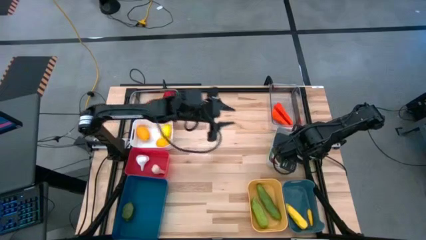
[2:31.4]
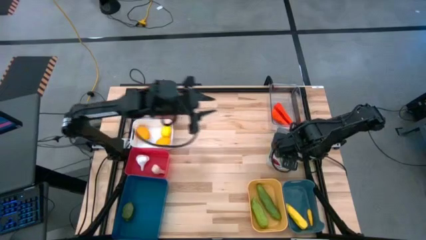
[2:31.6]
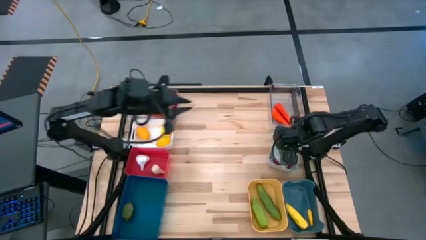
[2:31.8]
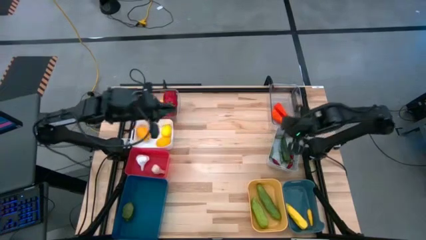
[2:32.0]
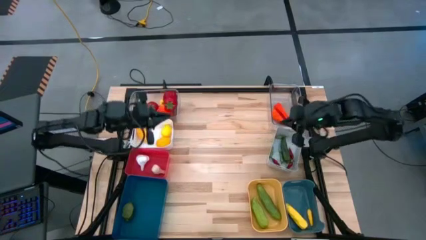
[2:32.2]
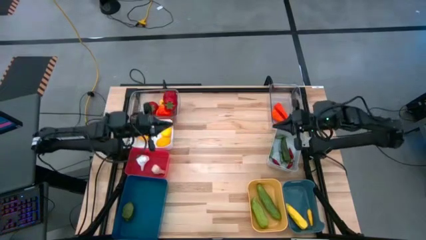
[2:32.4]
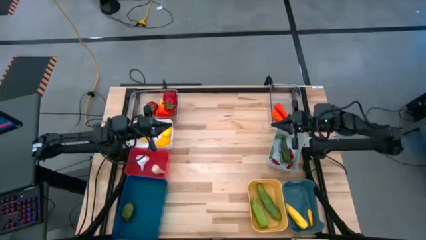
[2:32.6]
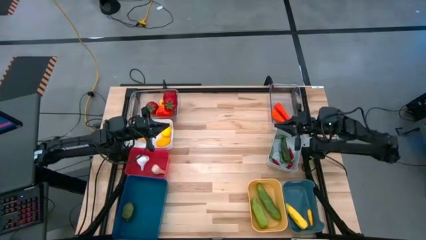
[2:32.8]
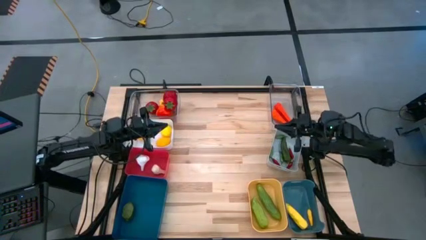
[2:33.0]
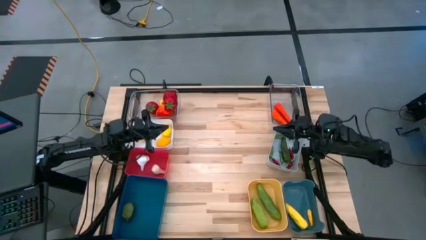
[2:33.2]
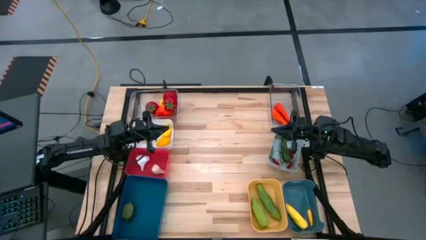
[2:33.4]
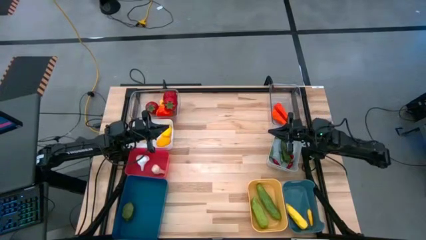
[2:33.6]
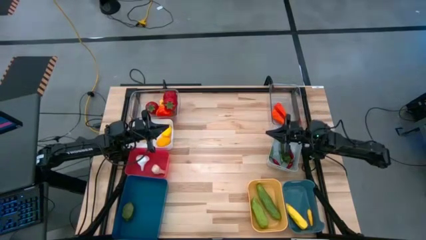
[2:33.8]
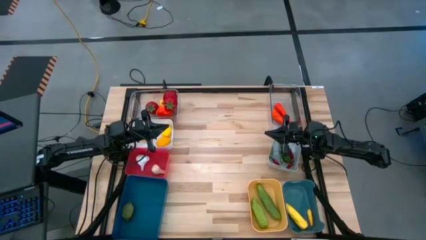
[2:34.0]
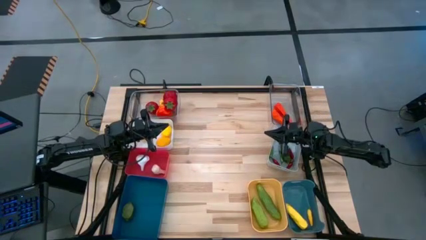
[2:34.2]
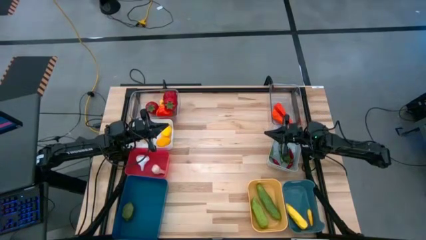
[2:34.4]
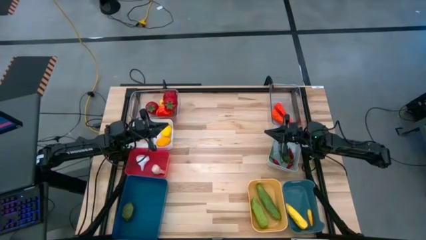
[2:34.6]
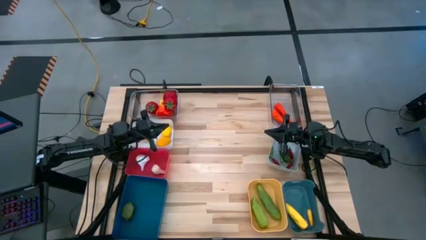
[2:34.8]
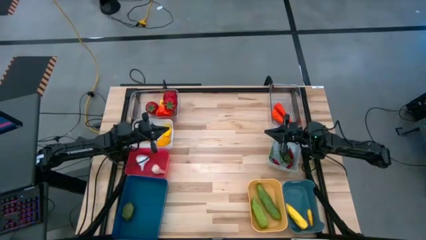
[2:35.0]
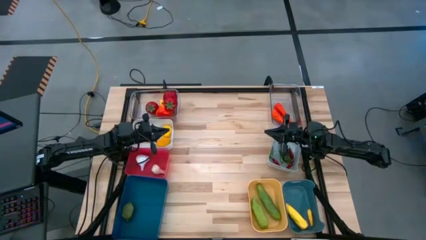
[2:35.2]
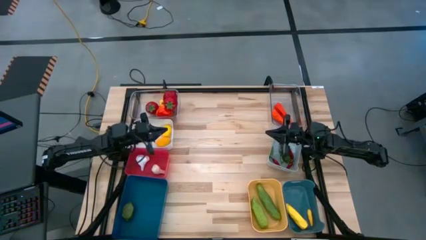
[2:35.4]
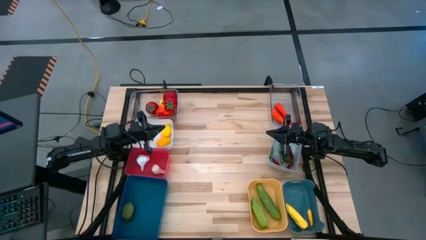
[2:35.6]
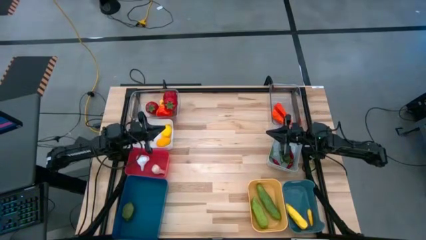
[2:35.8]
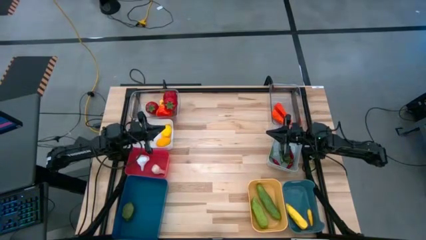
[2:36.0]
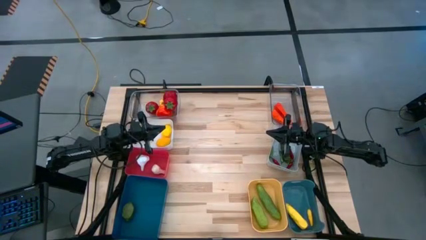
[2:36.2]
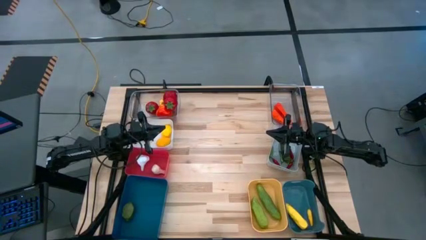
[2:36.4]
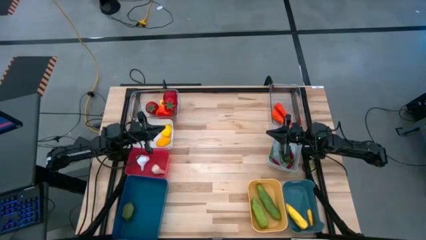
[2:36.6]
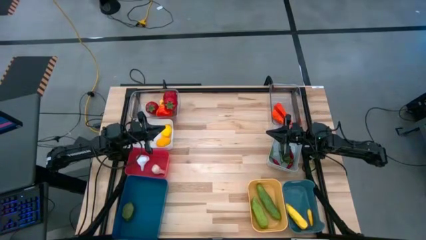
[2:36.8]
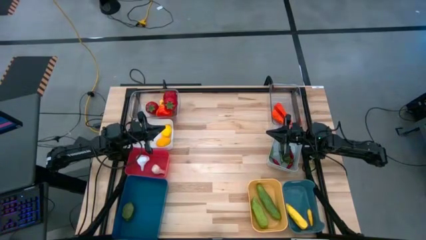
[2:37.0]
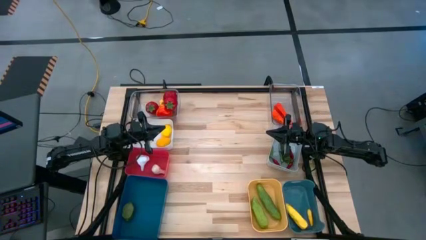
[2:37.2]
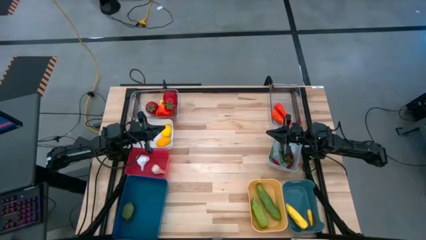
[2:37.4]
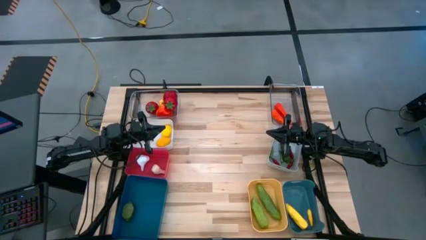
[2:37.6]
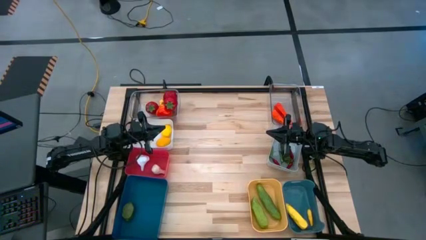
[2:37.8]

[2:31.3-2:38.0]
Task: Sort produce into baskets
Return to Home Position

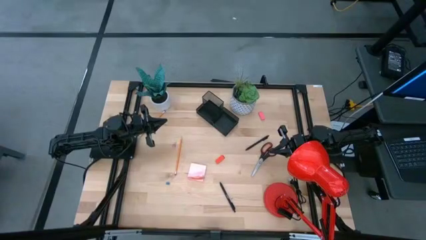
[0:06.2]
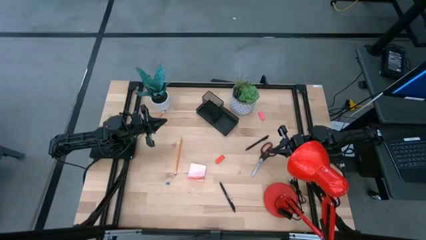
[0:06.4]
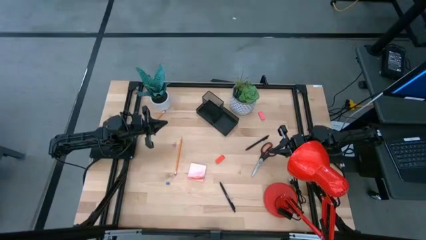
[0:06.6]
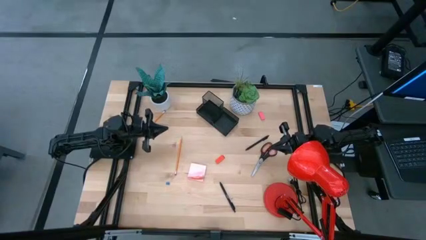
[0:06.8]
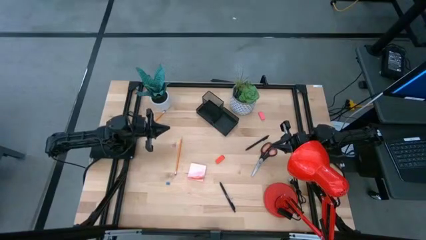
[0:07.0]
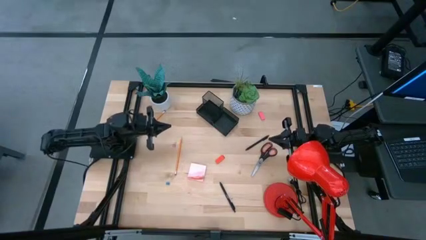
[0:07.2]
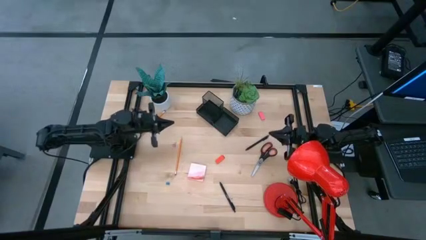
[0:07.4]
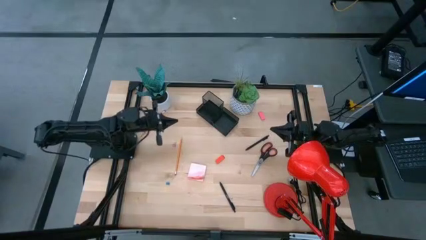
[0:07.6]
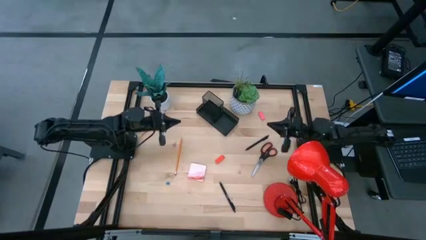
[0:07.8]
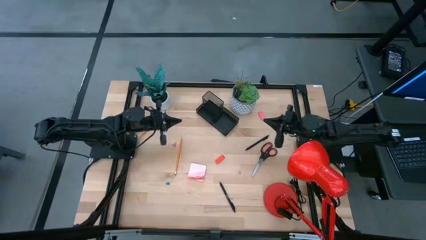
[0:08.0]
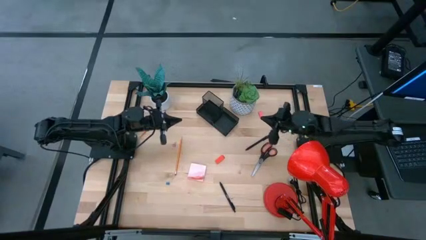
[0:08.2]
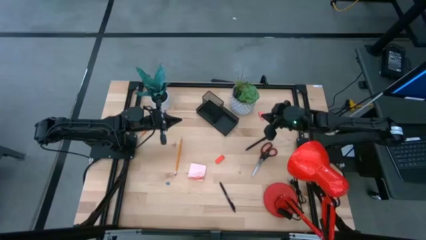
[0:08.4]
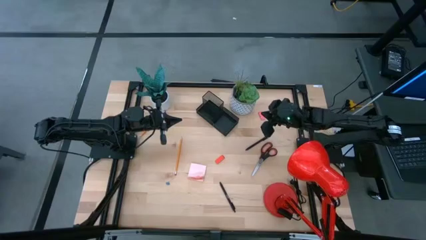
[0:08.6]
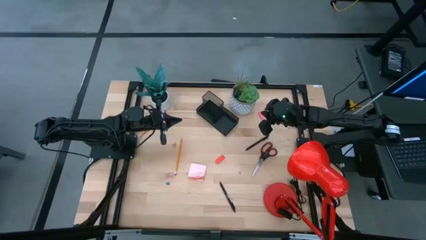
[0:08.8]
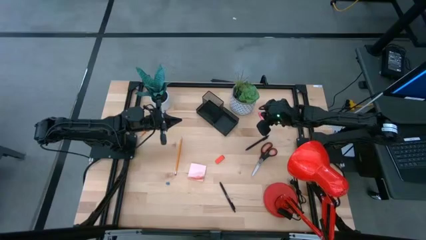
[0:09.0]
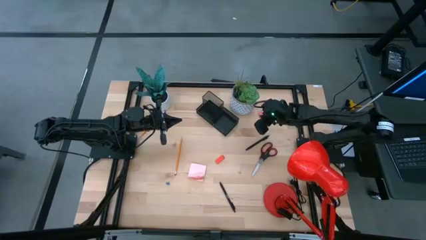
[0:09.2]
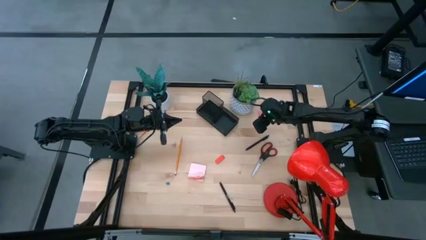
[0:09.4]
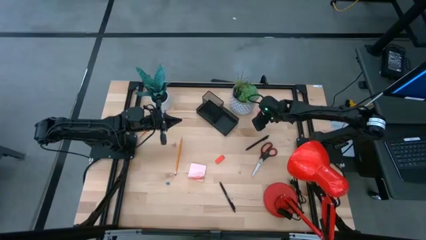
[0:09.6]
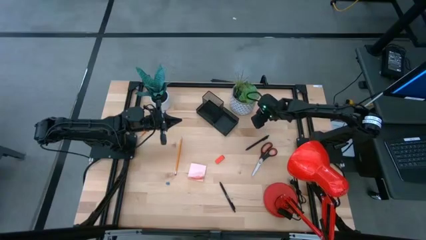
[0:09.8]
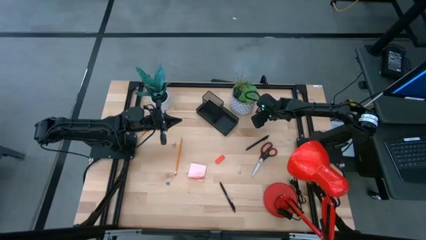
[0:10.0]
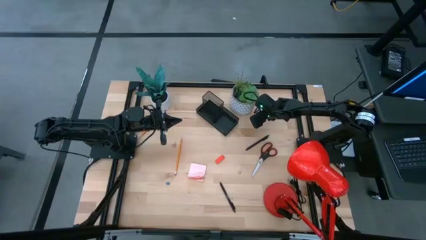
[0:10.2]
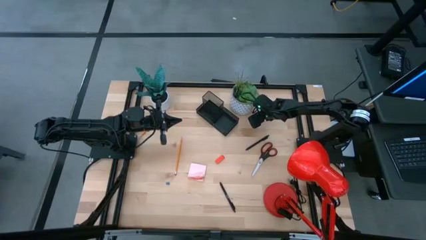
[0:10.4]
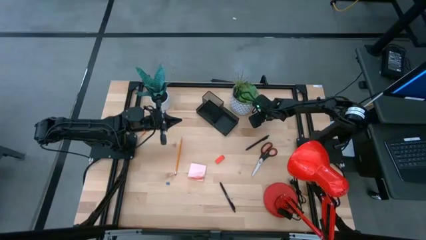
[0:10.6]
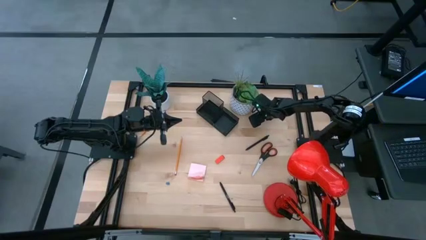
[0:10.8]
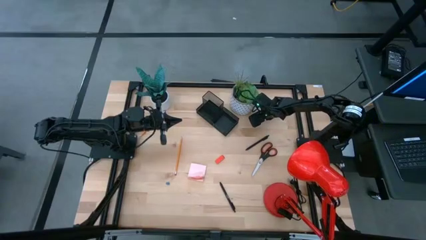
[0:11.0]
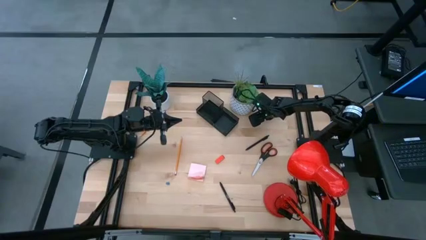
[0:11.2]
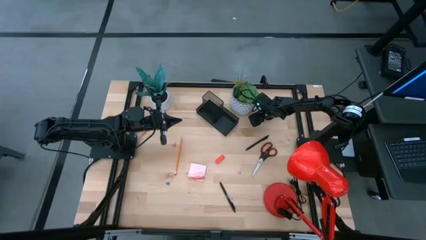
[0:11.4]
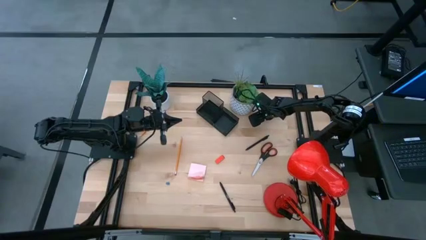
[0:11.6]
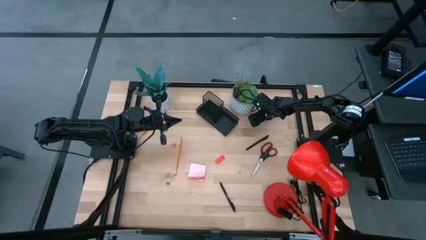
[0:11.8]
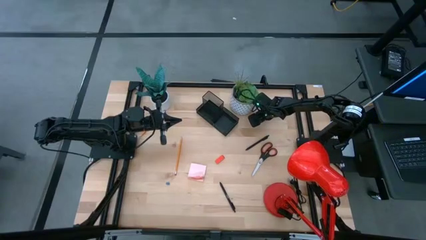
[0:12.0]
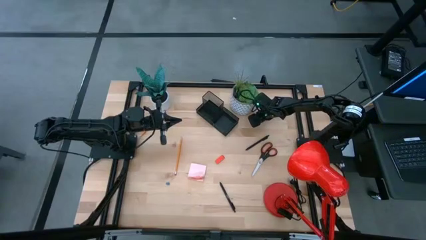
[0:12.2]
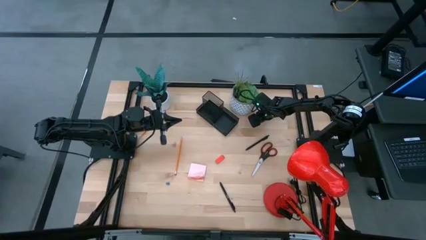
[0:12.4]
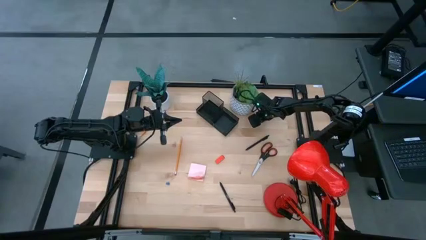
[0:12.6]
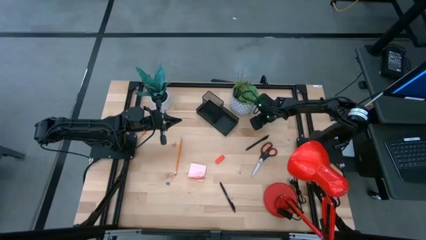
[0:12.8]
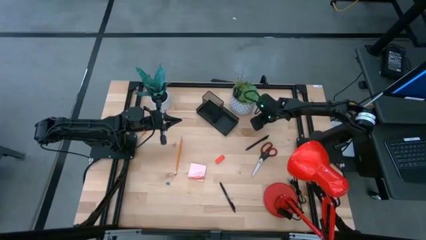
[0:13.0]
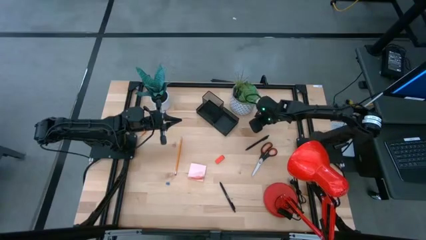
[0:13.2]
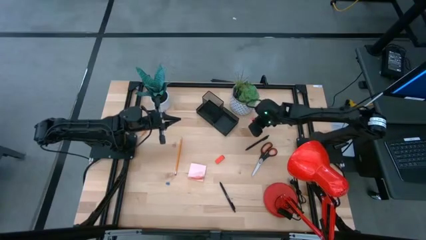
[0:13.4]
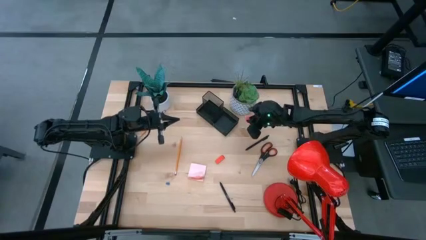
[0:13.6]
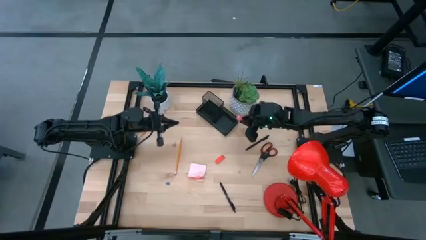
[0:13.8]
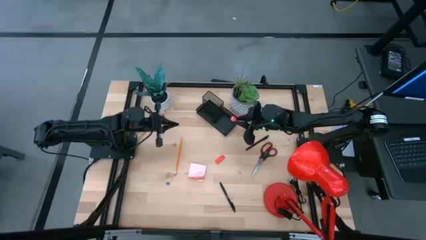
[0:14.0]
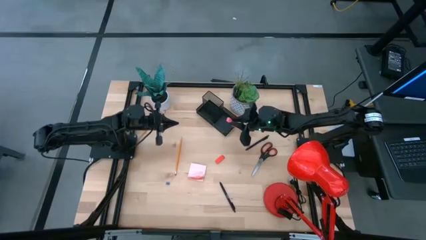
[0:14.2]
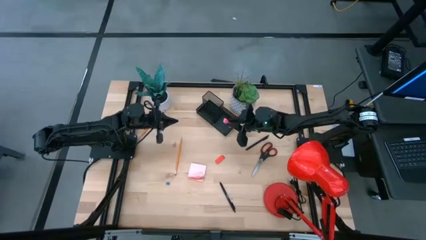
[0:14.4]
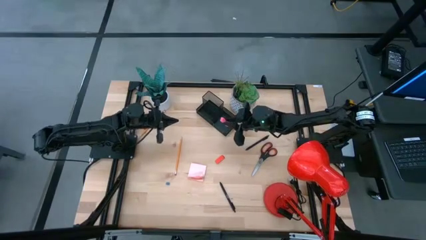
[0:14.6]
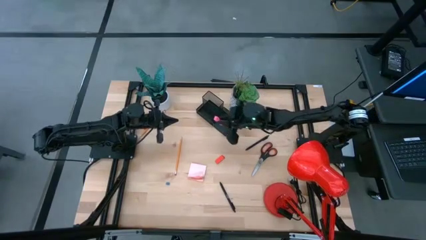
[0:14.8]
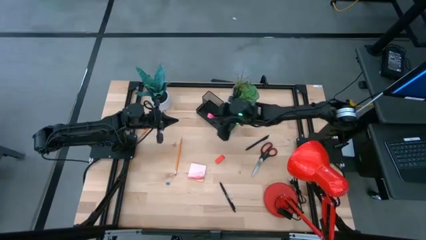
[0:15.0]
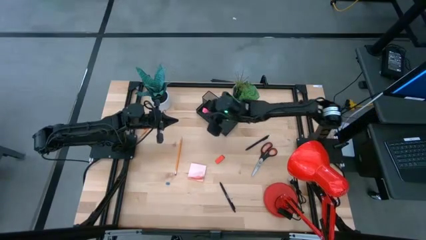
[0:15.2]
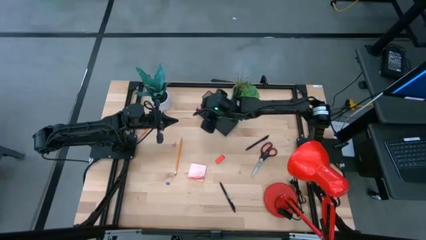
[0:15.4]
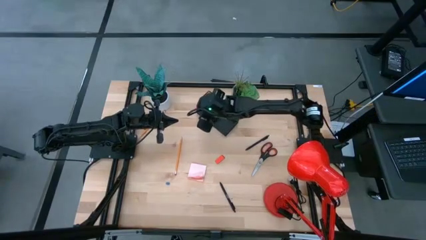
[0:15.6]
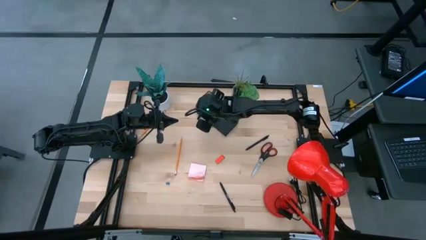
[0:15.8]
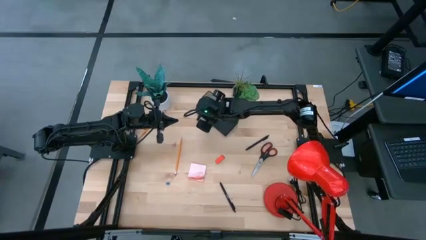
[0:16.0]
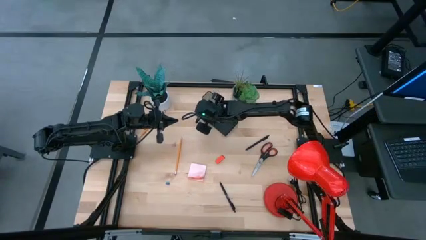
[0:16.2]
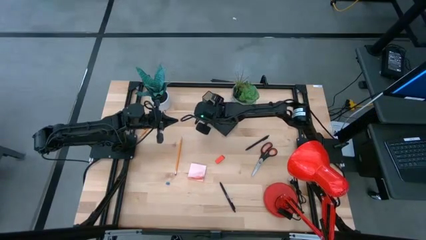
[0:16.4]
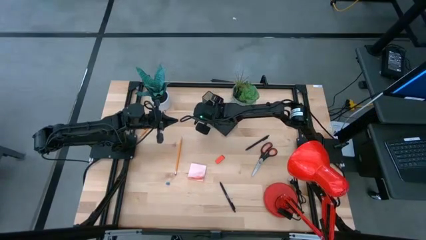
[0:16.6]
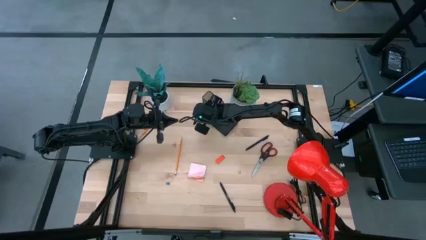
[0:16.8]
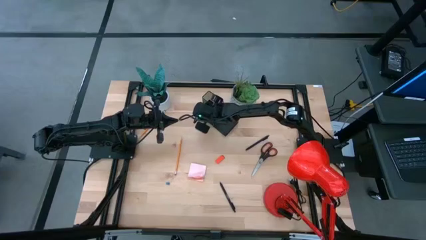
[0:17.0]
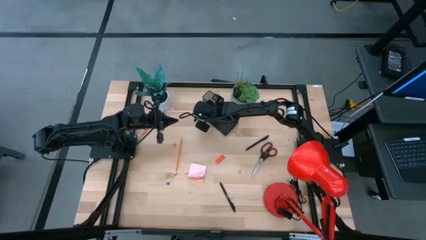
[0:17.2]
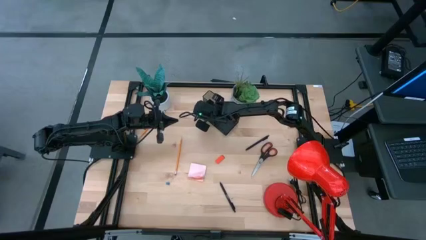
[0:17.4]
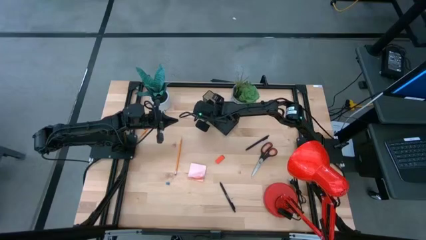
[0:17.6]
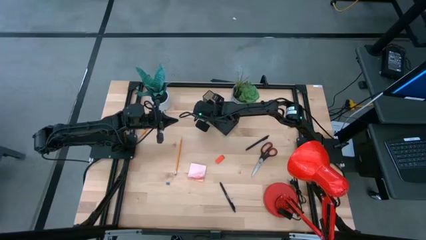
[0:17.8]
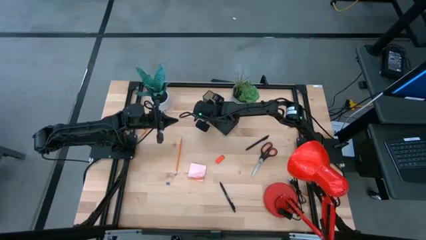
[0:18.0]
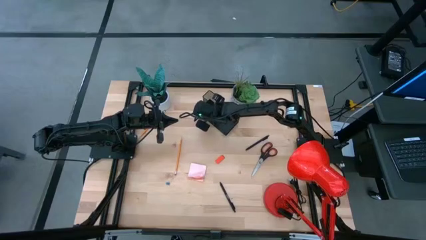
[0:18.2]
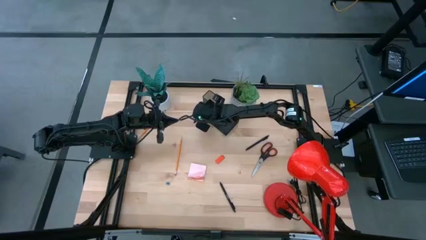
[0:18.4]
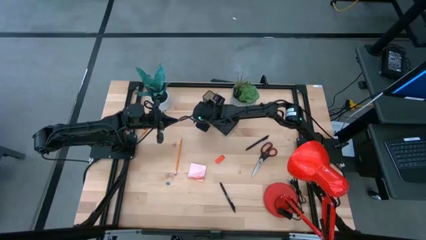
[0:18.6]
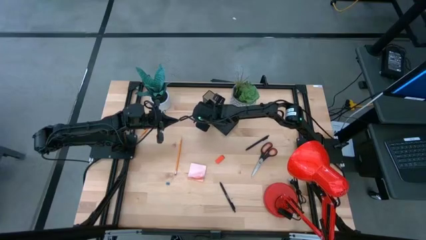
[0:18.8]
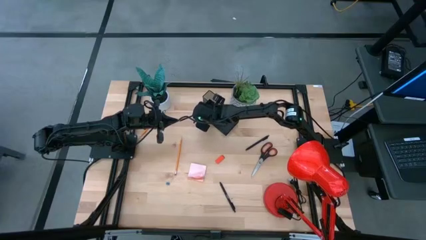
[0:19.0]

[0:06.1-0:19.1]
Task: Pick and place office supplies into organizer
Put the pink eraser into the black desk organizer
